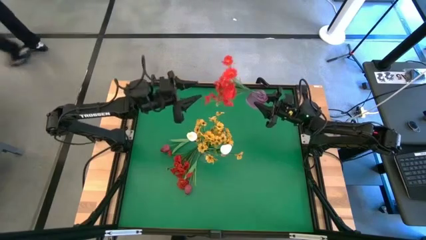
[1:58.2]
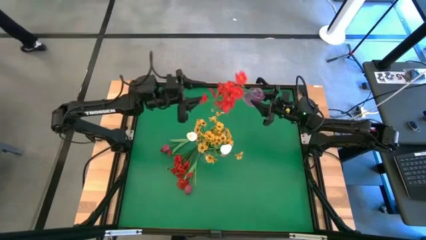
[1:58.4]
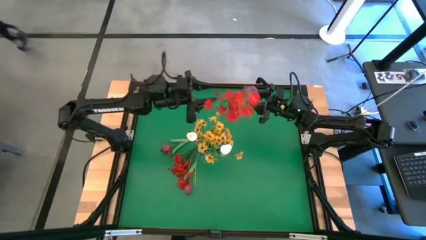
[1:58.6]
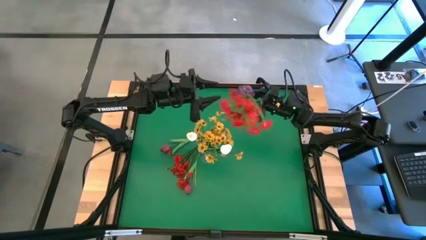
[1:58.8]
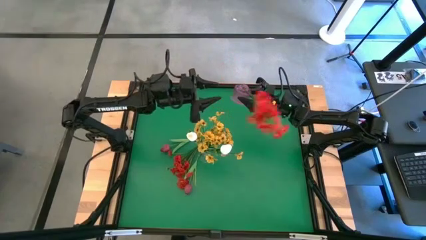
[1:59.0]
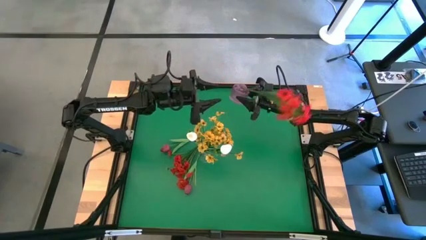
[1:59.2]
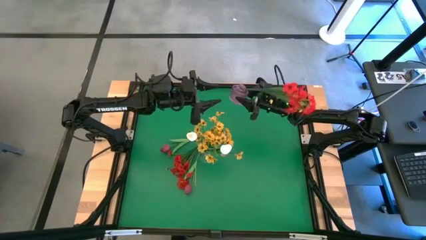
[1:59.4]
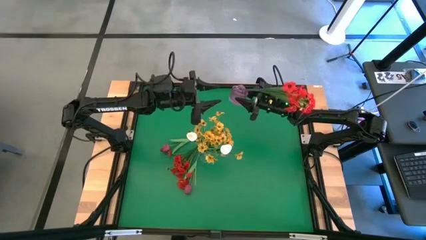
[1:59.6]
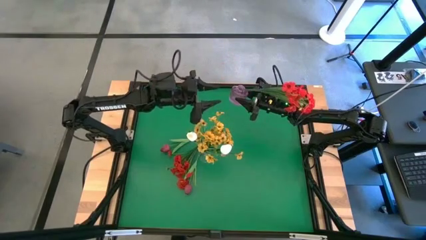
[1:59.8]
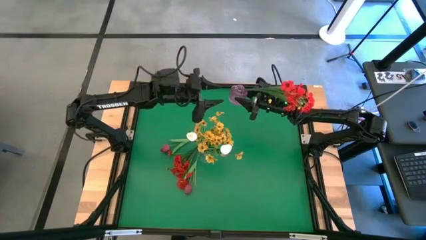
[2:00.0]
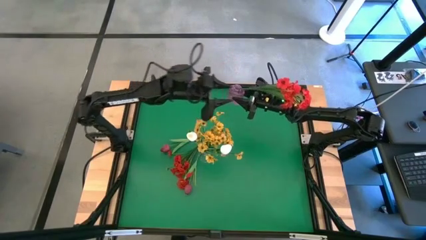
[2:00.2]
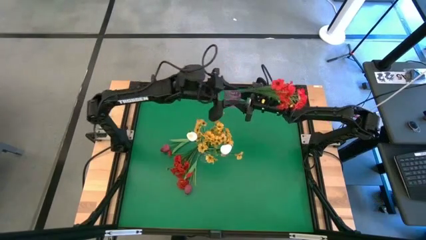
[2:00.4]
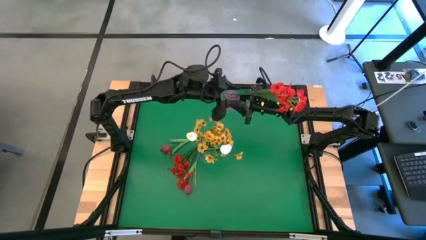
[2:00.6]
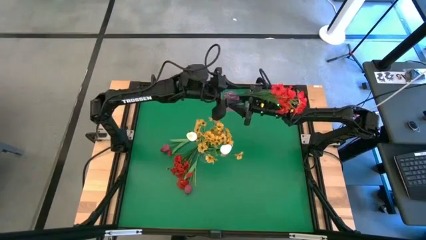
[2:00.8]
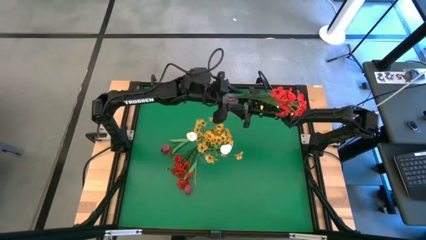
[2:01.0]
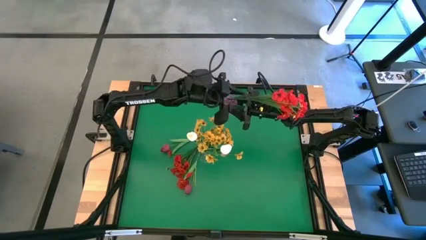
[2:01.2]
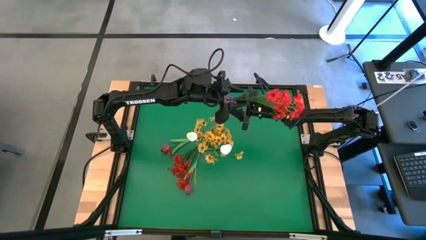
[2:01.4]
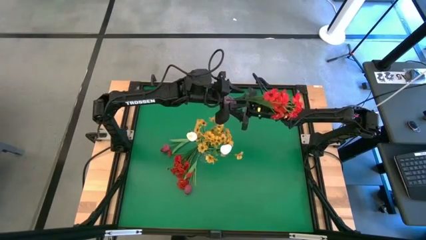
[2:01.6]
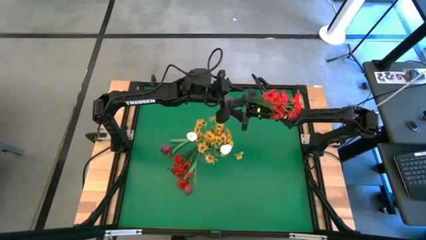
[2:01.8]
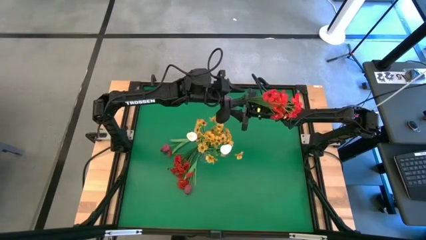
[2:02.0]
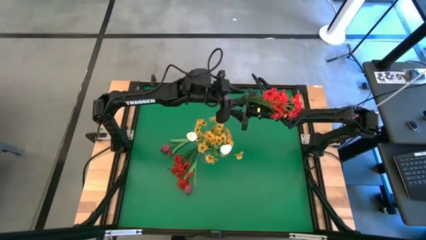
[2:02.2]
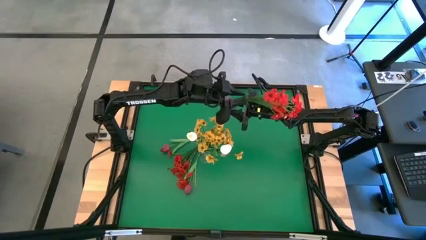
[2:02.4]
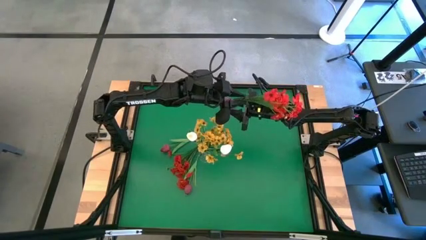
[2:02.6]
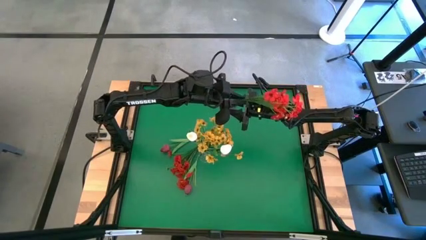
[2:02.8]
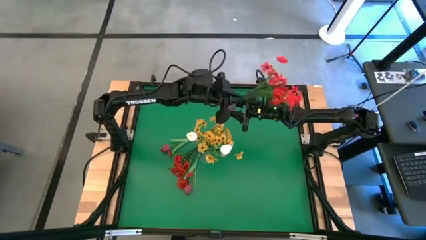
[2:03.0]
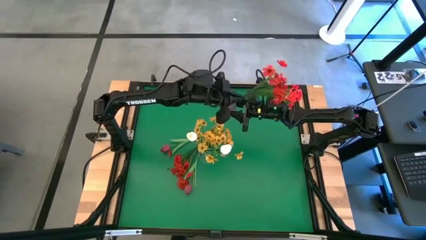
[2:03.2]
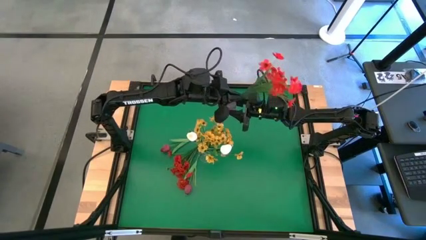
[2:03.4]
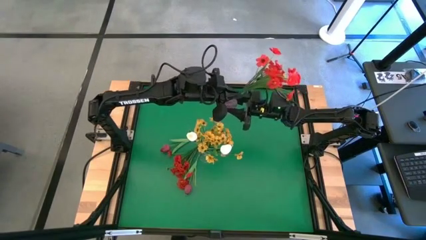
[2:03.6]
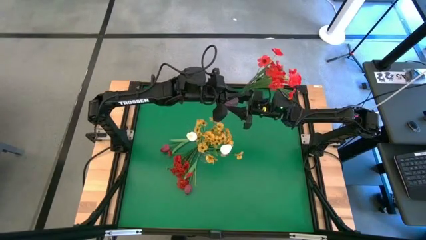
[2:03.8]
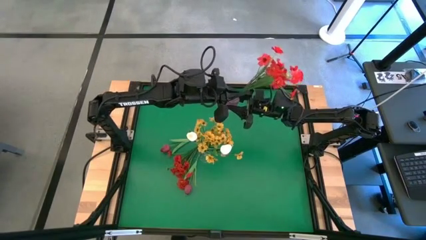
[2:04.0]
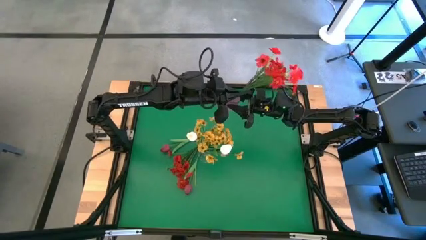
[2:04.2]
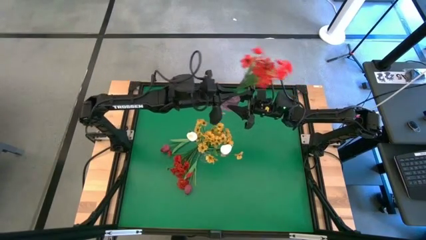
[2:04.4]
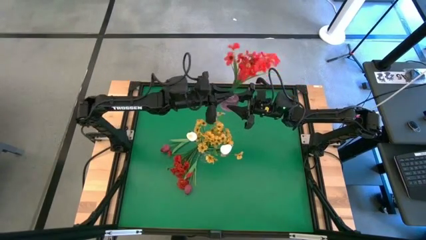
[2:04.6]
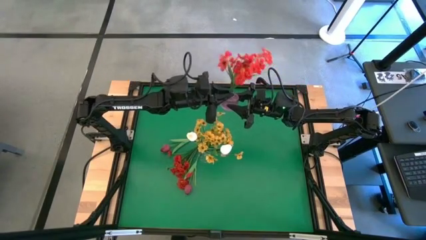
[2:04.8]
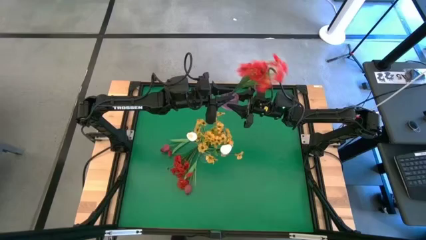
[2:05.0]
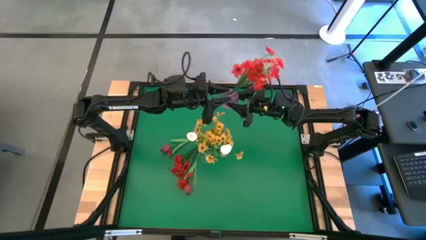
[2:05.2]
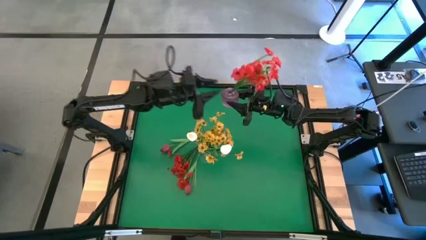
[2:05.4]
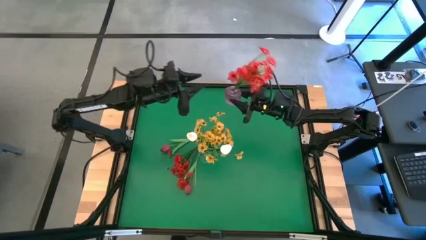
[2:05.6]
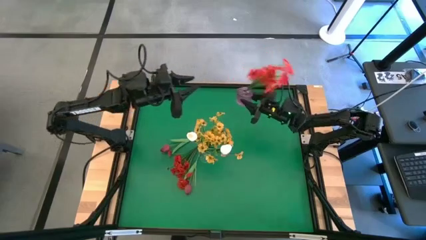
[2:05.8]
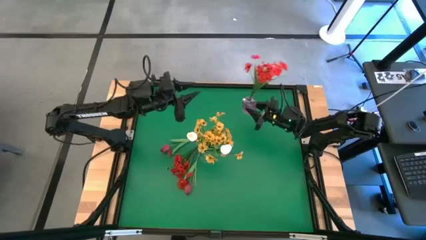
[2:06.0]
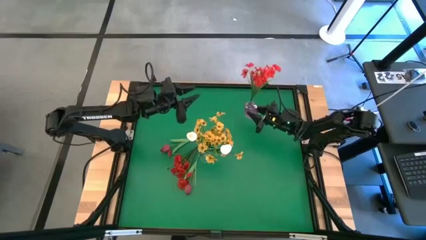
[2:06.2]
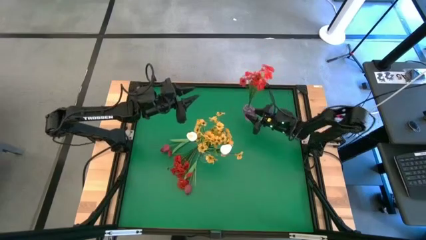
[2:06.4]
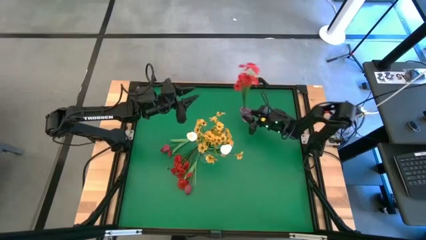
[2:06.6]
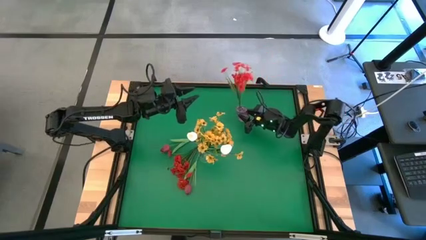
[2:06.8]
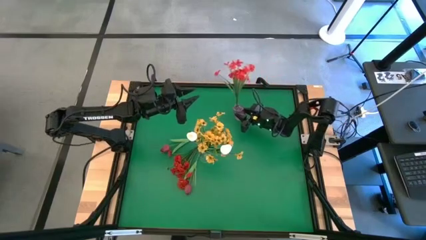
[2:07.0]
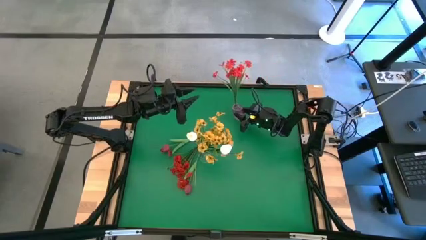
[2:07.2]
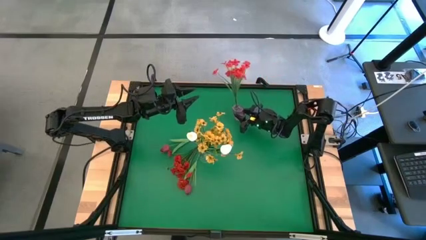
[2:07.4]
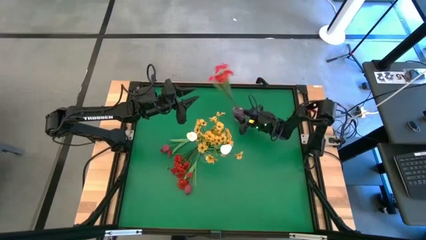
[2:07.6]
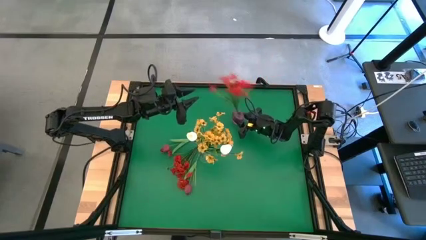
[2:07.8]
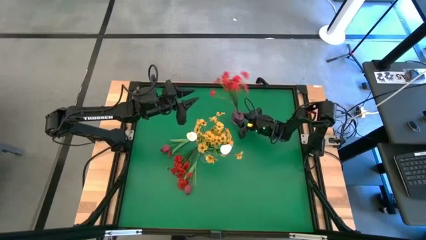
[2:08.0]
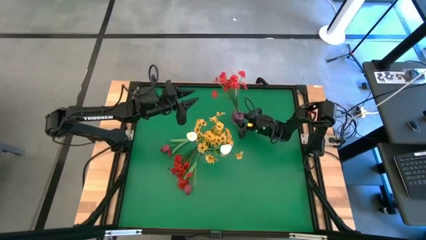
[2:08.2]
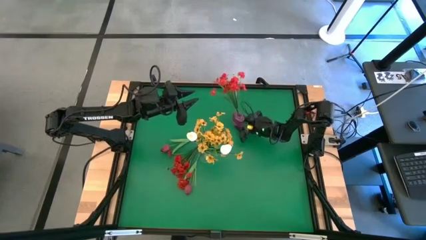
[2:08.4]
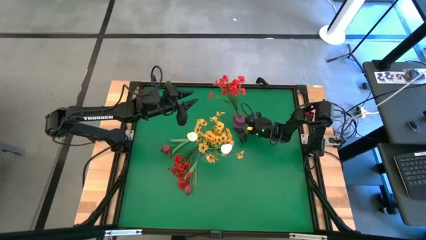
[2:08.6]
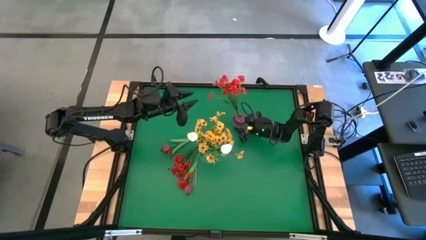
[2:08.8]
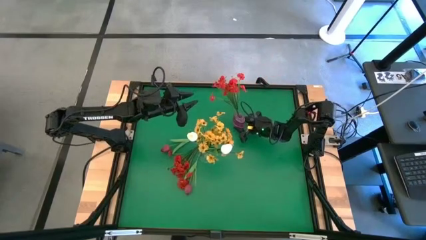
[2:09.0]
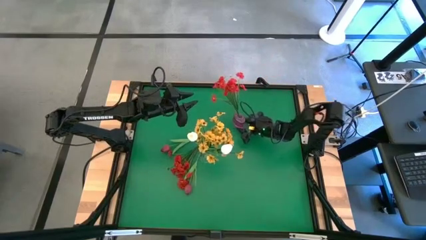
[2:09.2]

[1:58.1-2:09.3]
Task: Sort flowers into vase by color
Adjust the violet vase

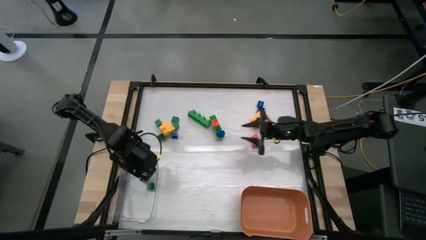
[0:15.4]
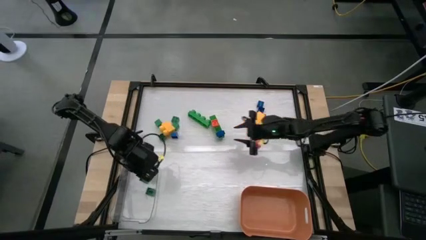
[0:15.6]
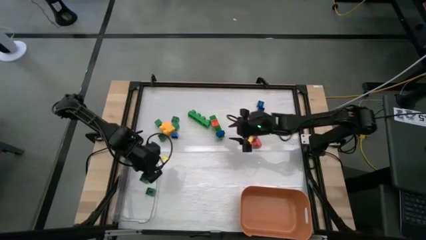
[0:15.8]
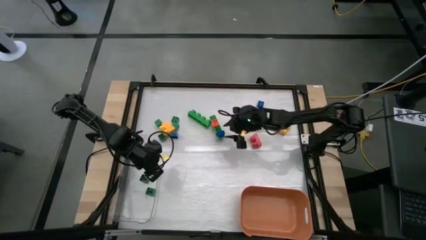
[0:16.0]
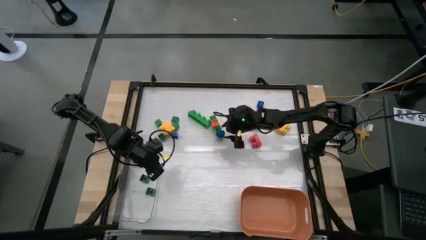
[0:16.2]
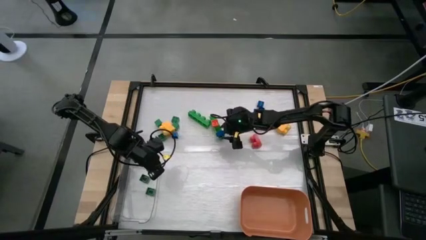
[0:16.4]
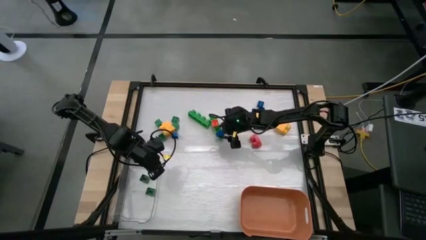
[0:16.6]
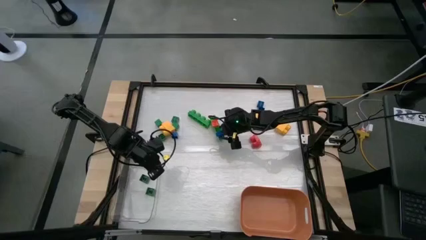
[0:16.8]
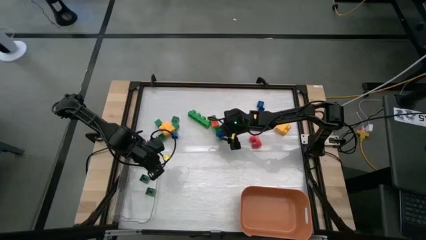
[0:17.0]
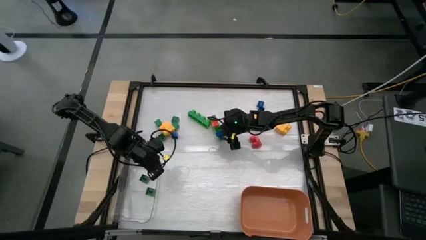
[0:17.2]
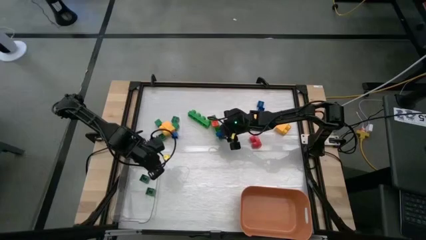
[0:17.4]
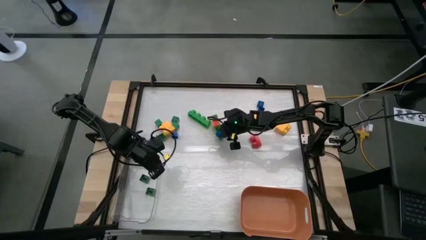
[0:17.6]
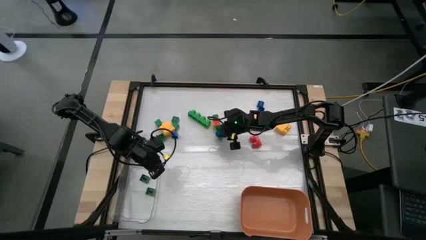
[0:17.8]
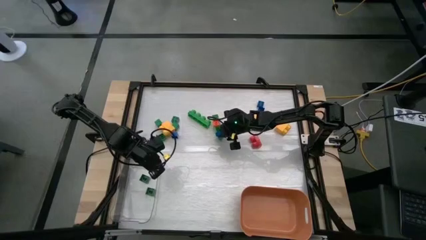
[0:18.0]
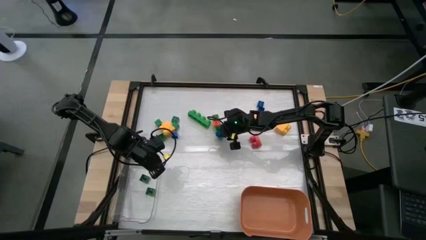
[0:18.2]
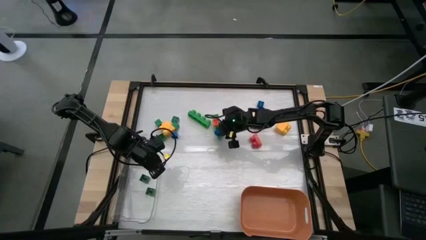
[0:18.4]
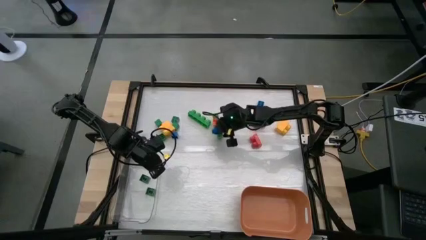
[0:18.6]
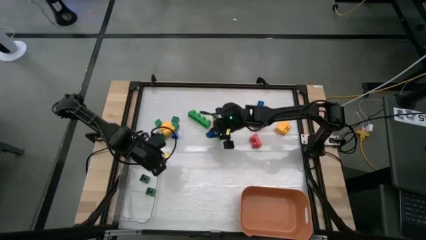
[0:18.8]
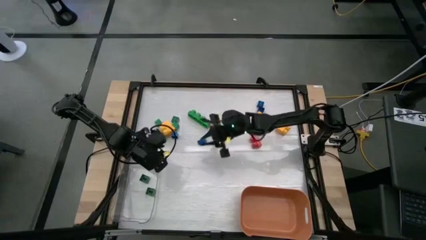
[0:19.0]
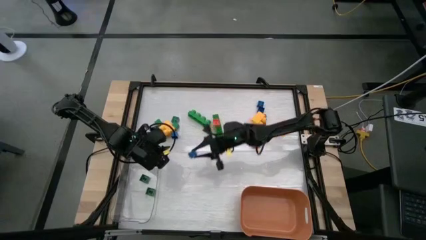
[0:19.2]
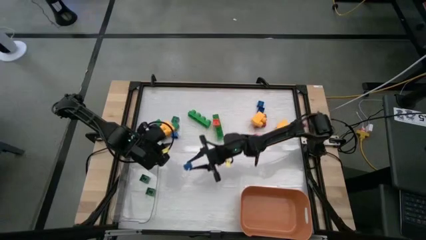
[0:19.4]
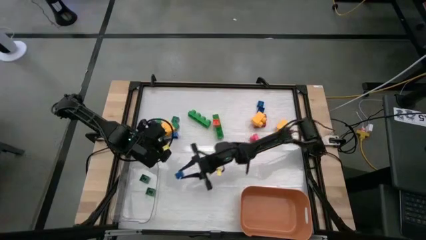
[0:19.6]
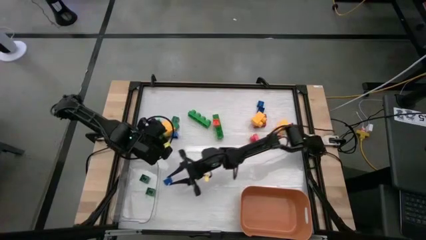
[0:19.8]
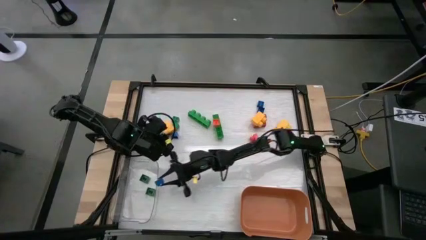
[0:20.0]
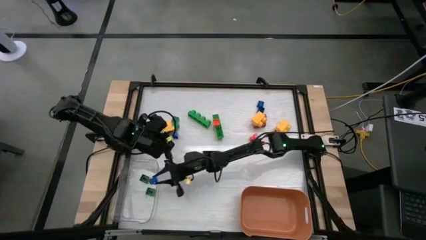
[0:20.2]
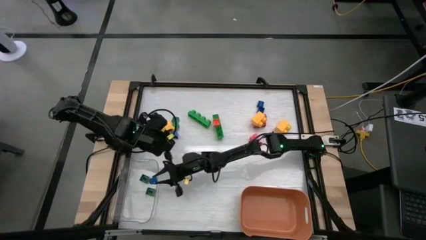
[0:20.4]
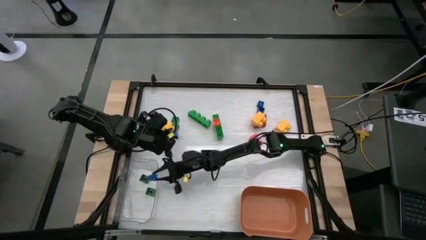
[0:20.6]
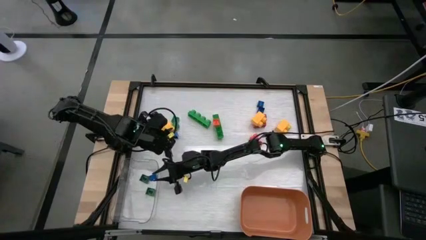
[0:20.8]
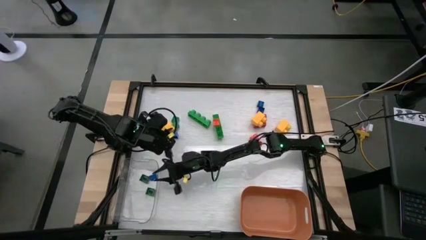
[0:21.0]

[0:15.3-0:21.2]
Task: Sort blocks by size
Put the small blue game piece into the transparent bin
